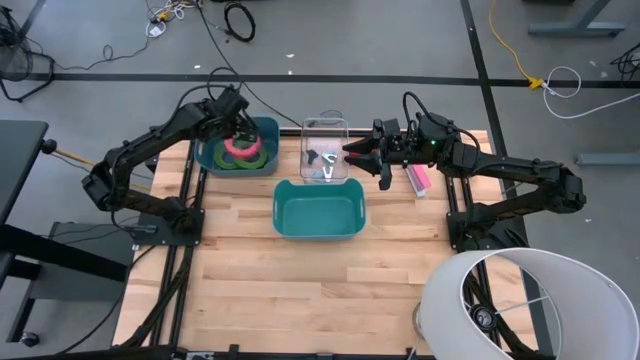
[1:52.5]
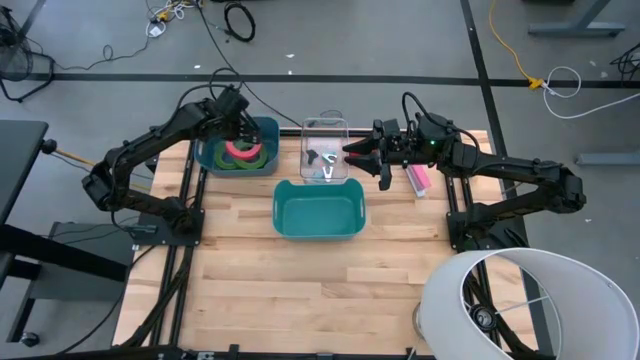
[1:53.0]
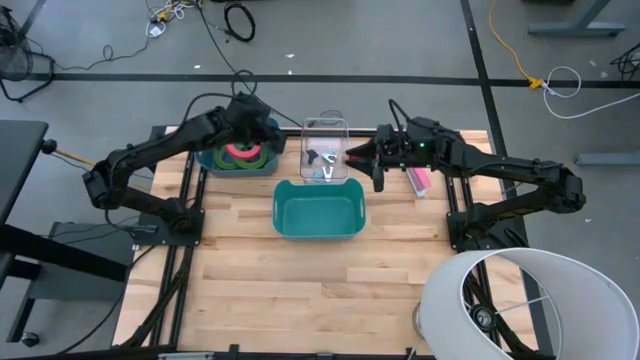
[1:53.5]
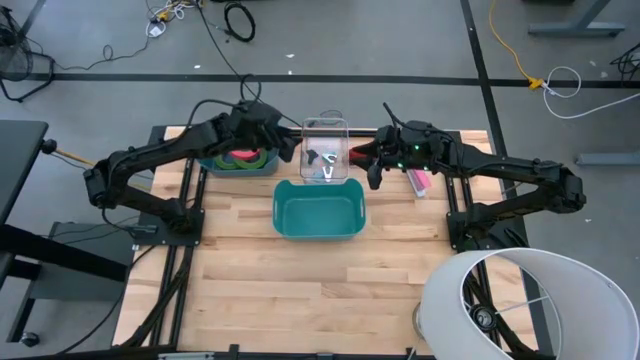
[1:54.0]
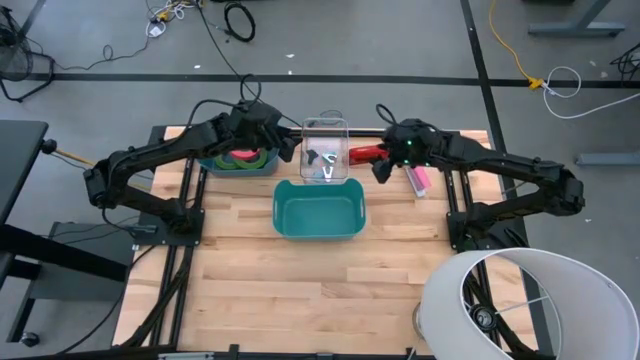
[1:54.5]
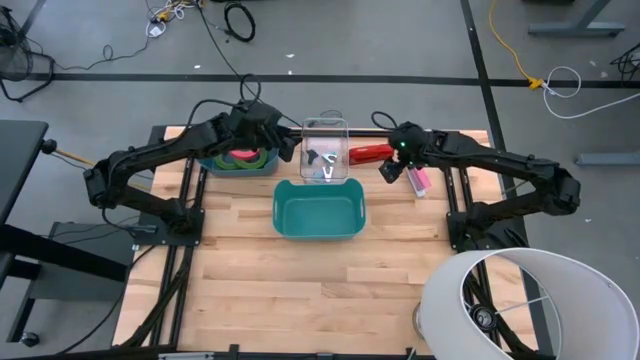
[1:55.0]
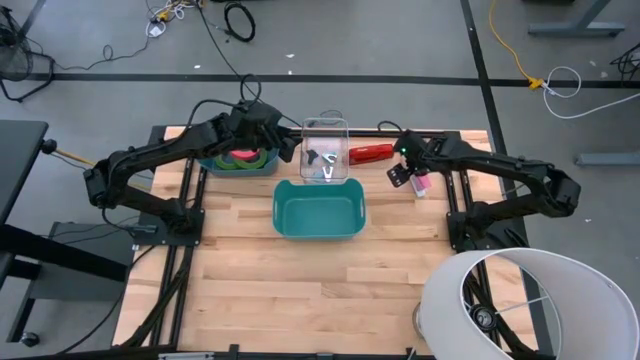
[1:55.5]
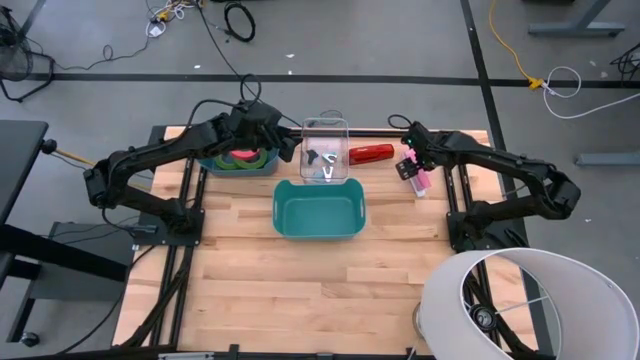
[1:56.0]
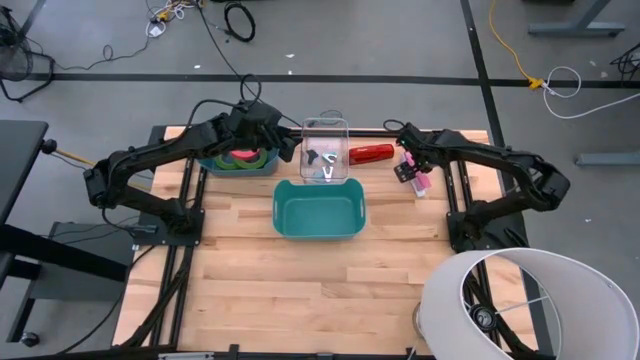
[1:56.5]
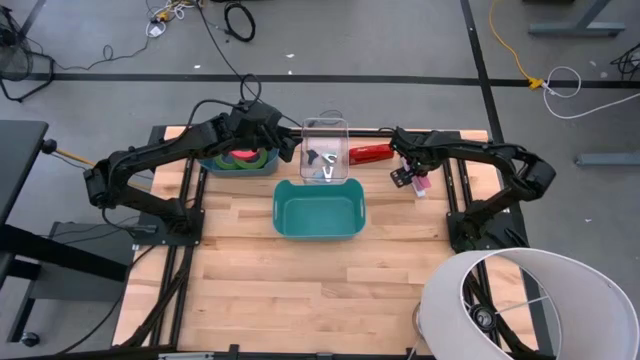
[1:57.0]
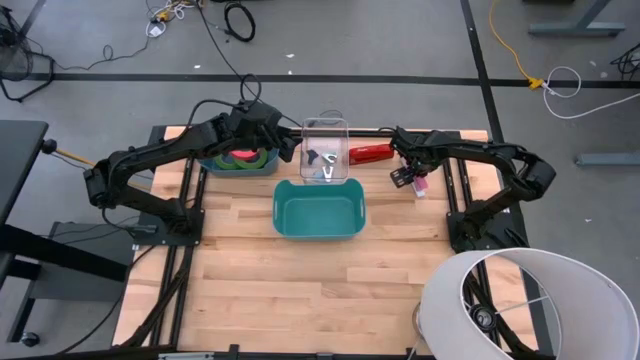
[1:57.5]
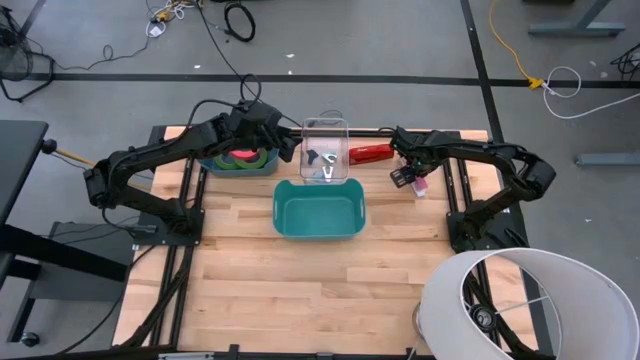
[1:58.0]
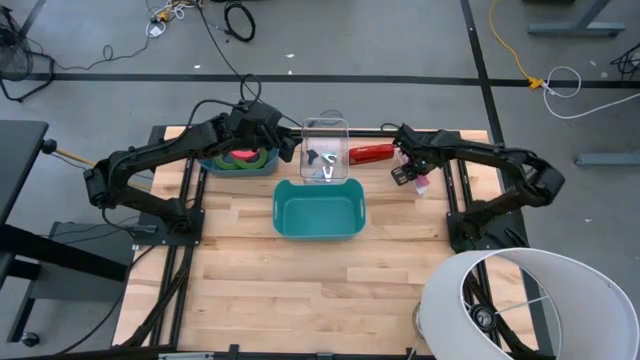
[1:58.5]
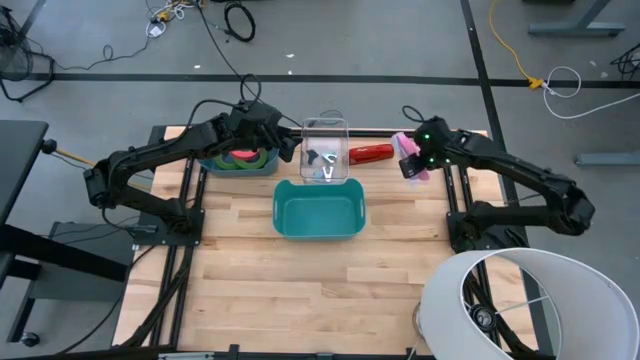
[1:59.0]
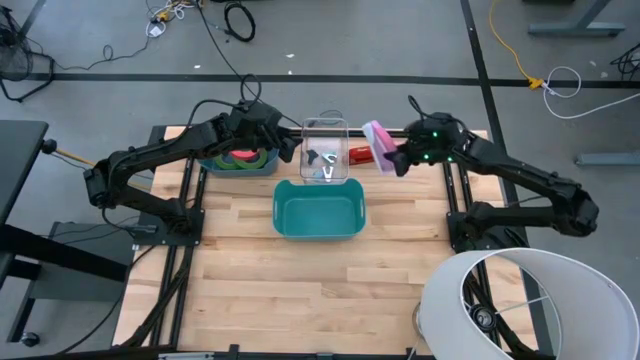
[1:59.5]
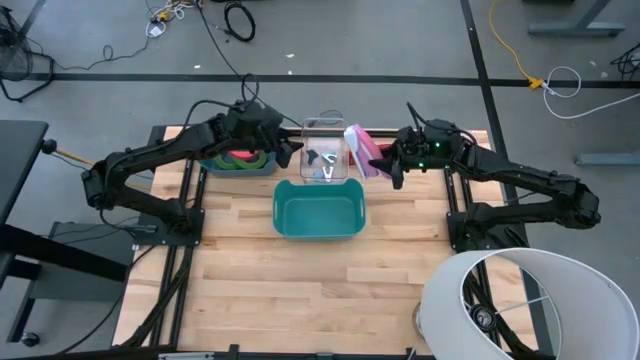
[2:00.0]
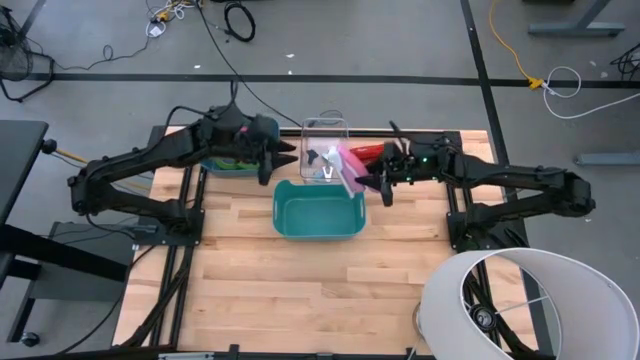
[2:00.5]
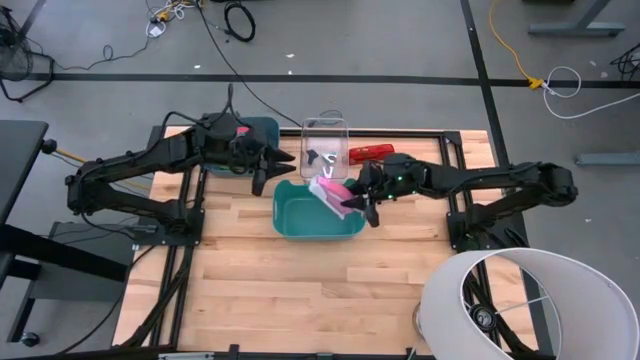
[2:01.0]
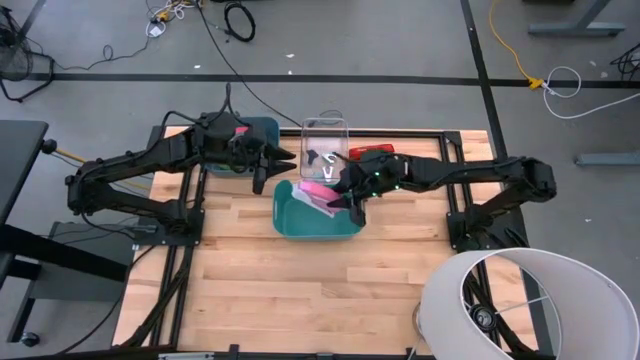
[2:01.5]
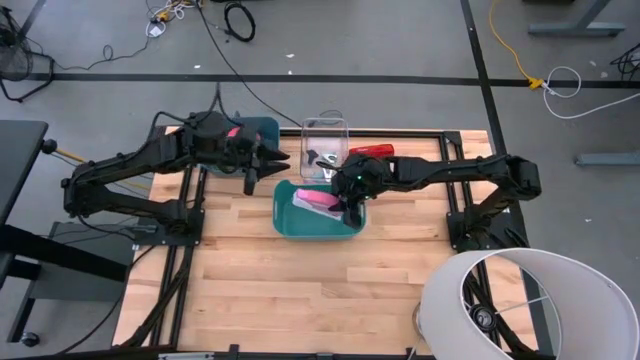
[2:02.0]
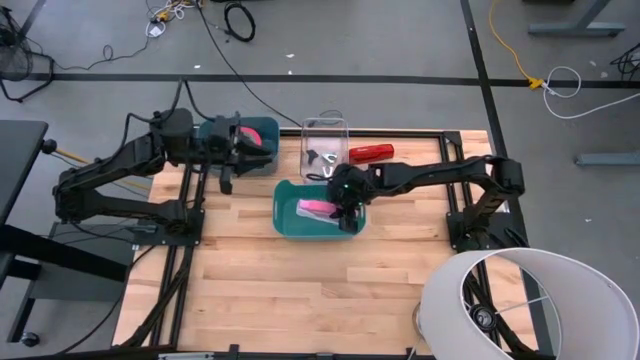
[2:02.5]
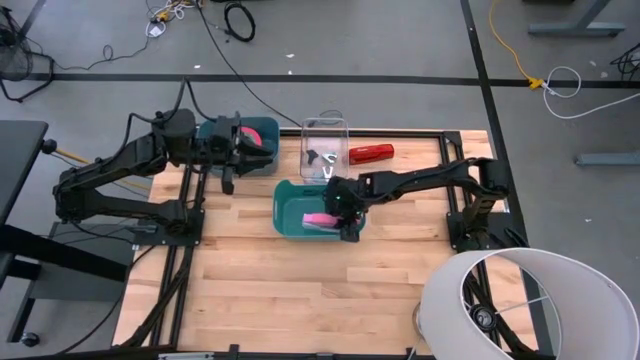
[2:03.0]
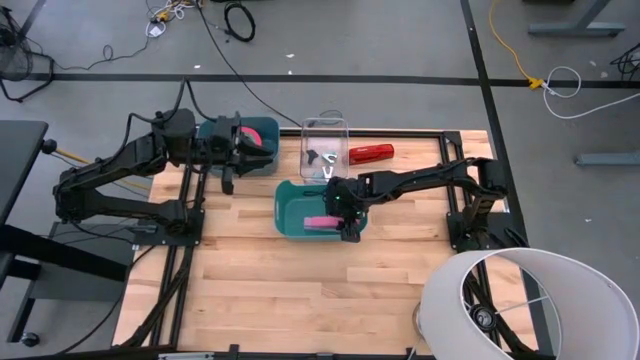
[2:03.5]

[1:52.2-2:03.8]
Task: Pick and place Stapler, Stapler remover, tape
Put the pink stapler into the green bin

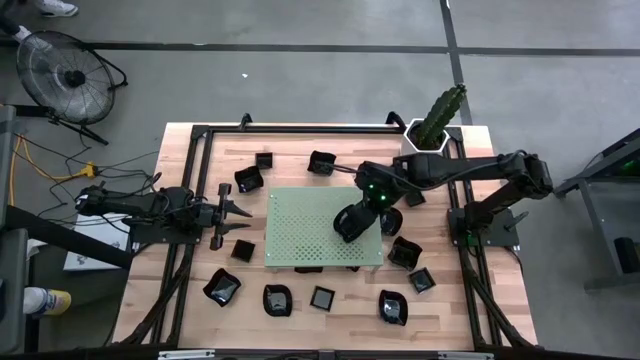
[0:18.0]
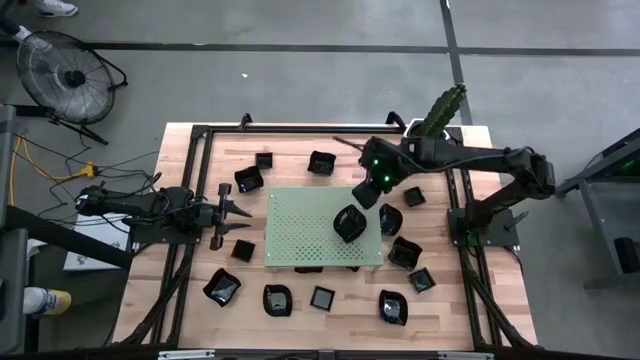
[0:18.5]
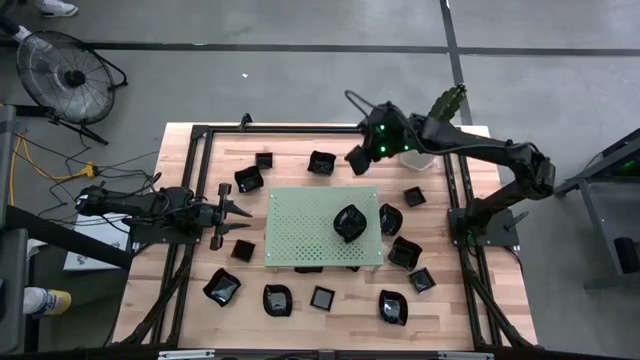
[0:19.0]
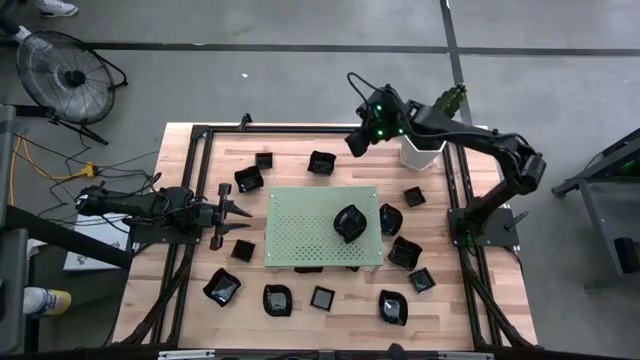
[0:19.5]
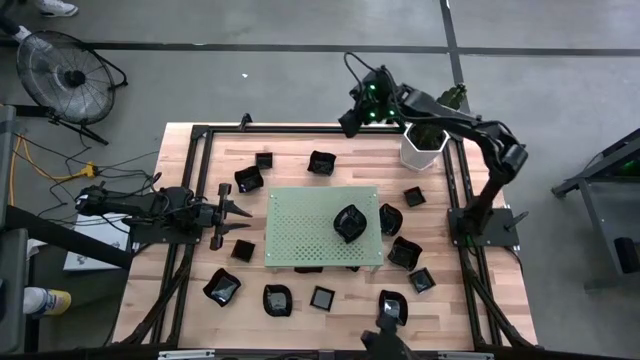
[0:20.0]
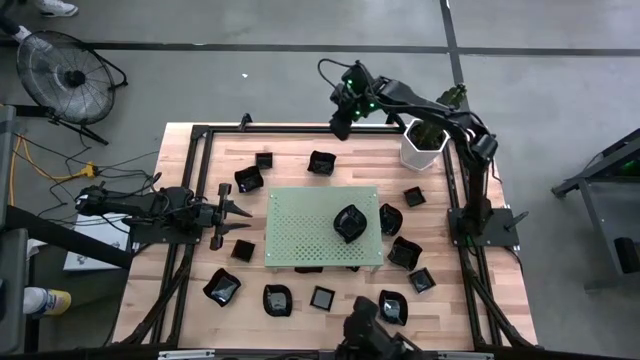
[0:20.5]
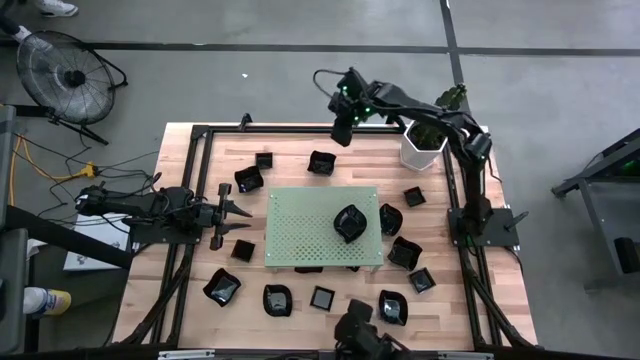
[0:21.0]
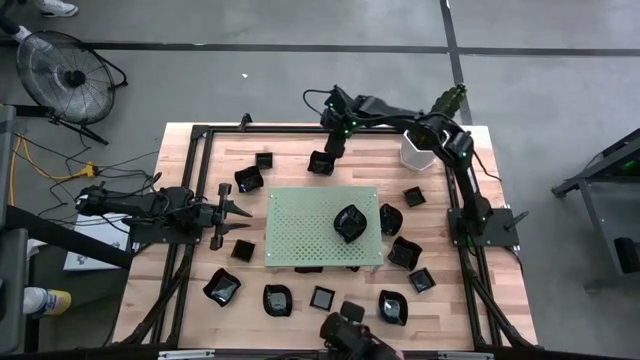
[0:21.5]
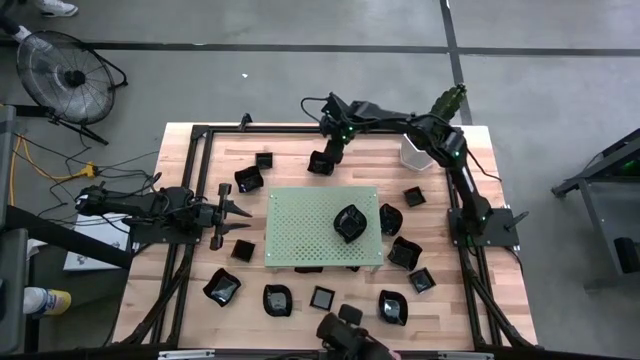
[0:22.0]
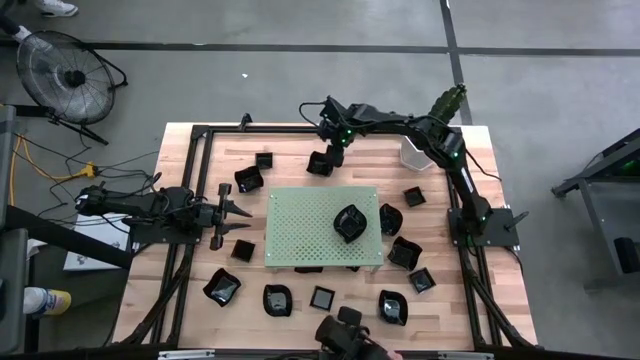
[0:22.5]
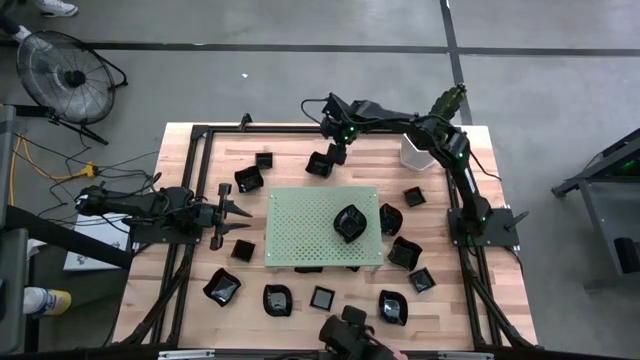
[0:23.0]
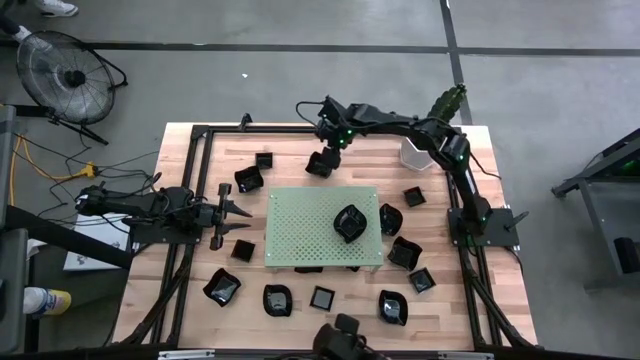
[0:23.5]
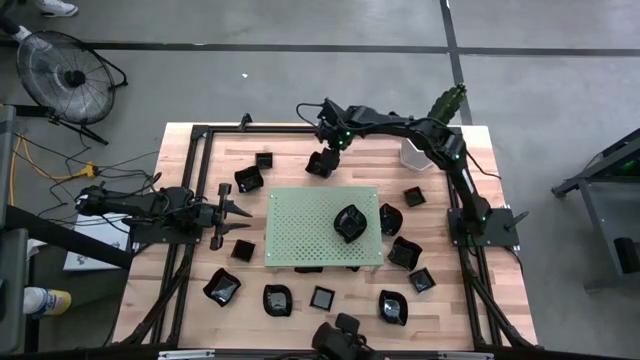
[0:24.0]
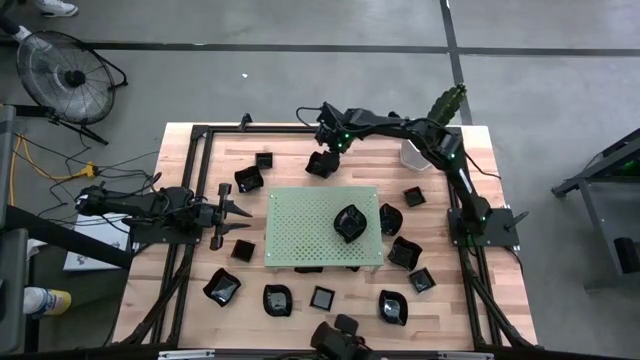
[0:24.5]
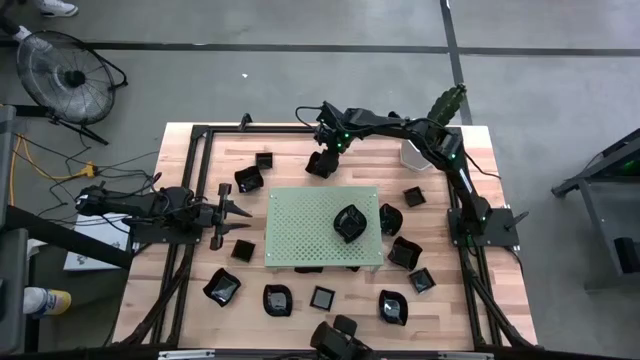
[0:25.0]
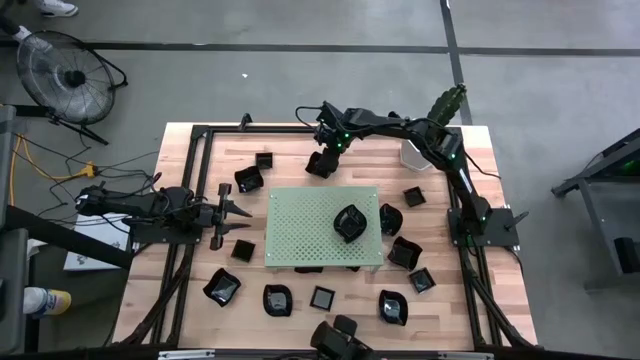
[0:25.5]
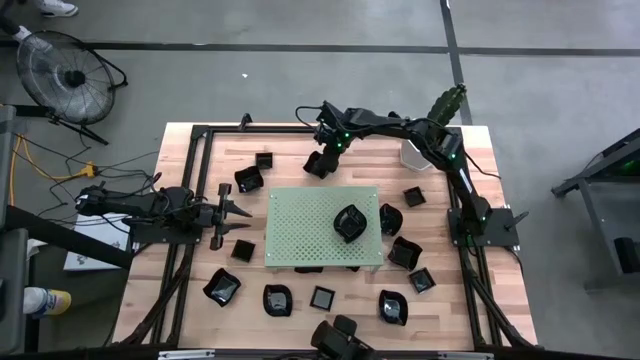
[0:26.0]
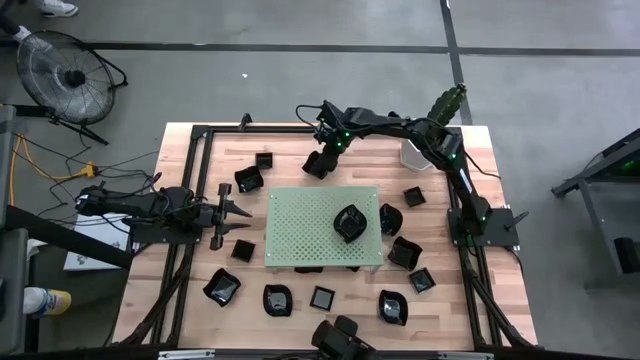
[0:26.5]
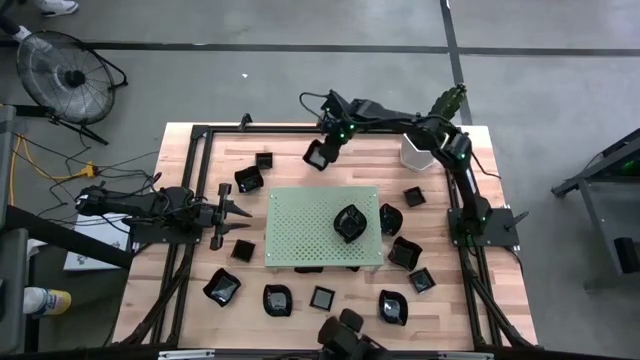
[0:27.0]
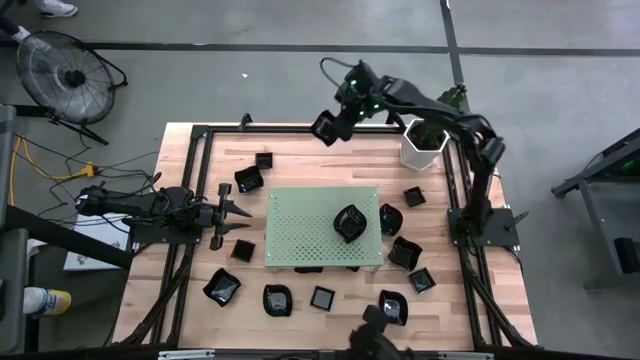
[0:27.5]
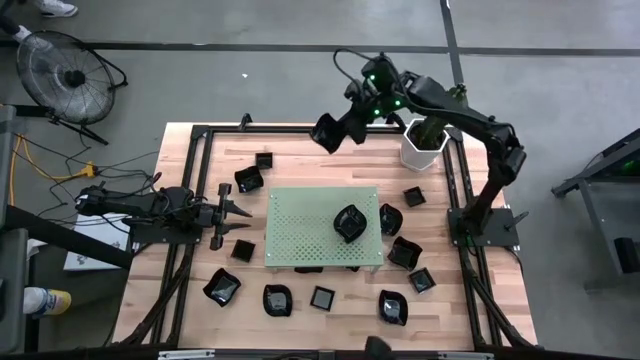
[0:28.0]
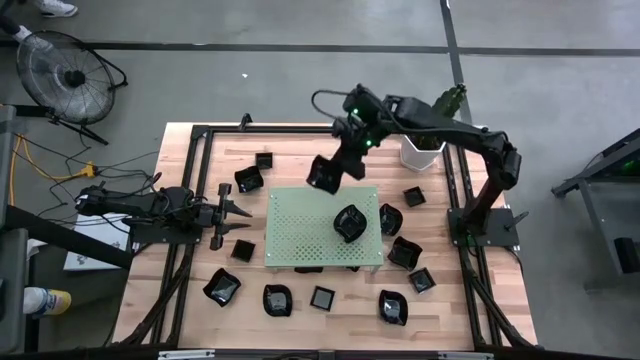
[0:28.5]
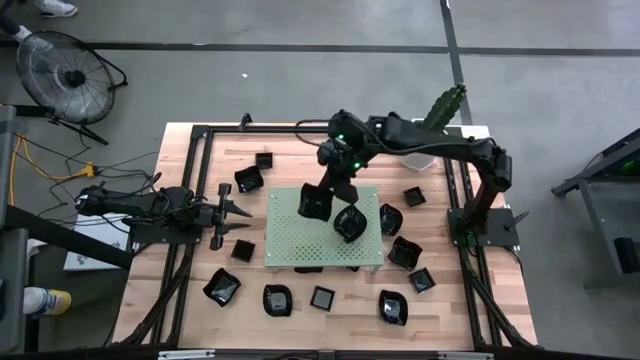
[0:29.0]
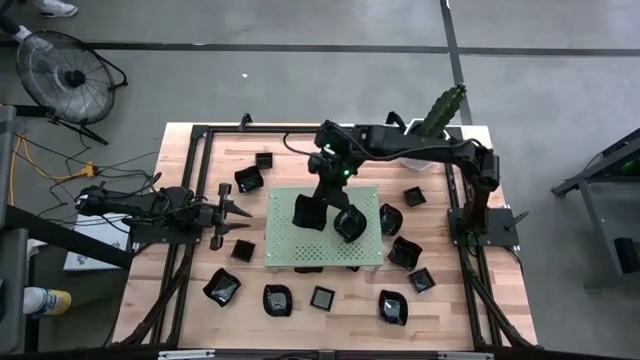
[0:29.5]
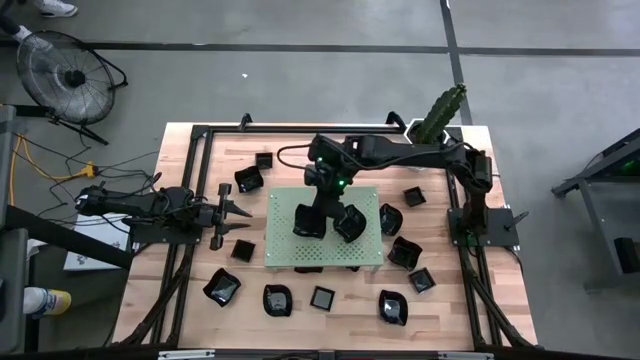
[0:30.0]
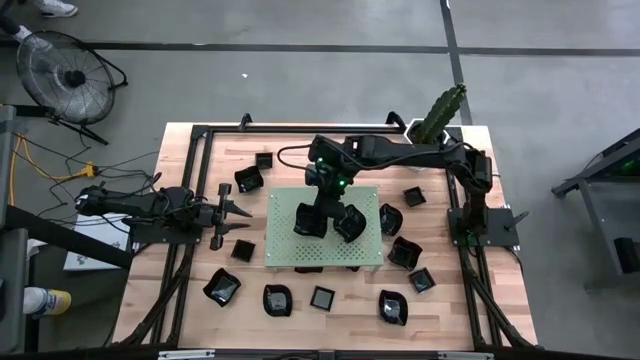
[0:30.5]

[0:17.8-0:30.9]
Task: Pick & Place Mini shaped plates
Put the black wave square shaped bowl on the shelf
